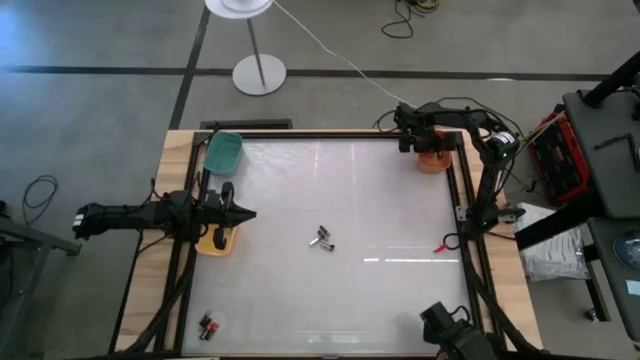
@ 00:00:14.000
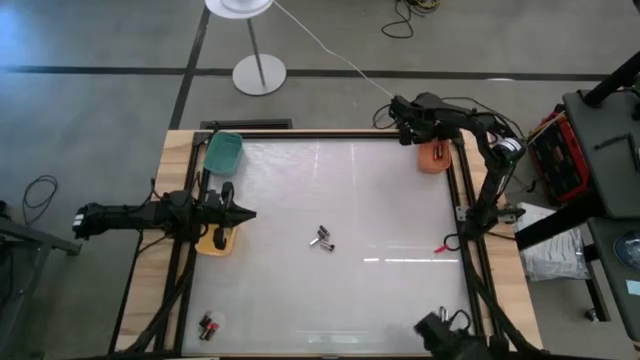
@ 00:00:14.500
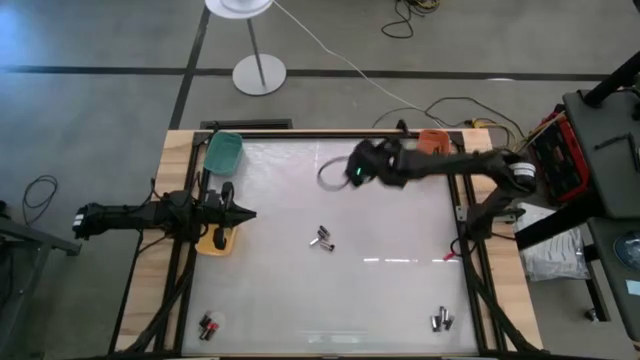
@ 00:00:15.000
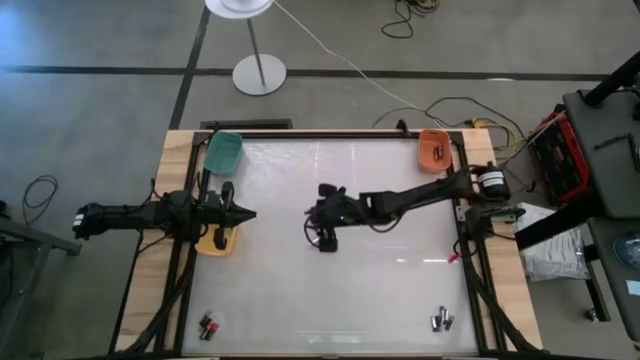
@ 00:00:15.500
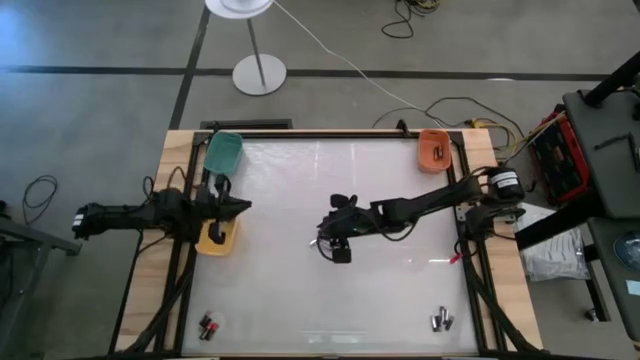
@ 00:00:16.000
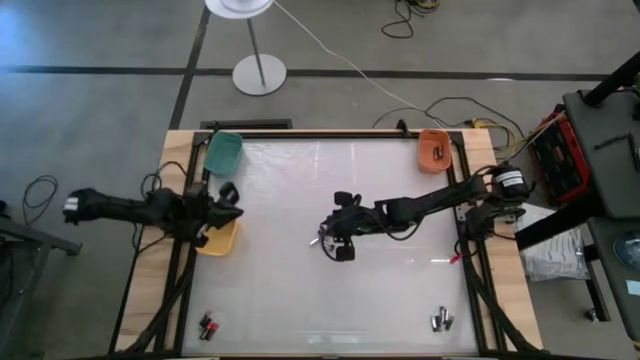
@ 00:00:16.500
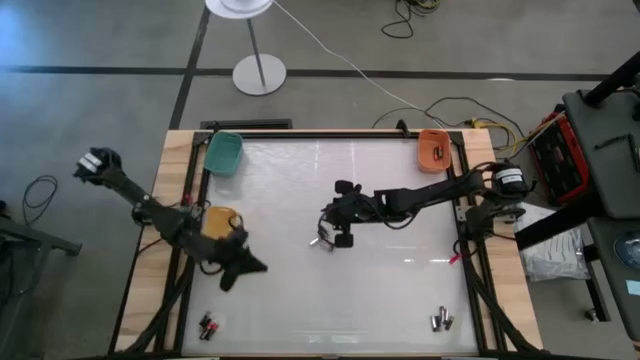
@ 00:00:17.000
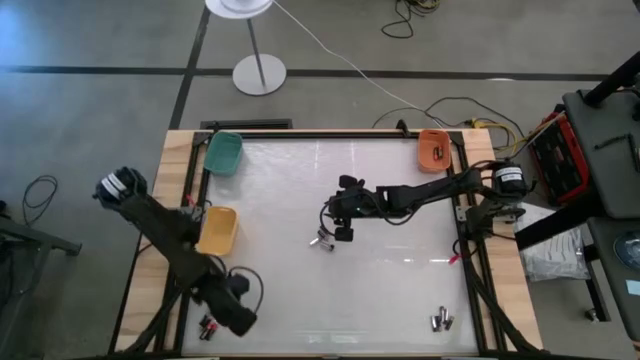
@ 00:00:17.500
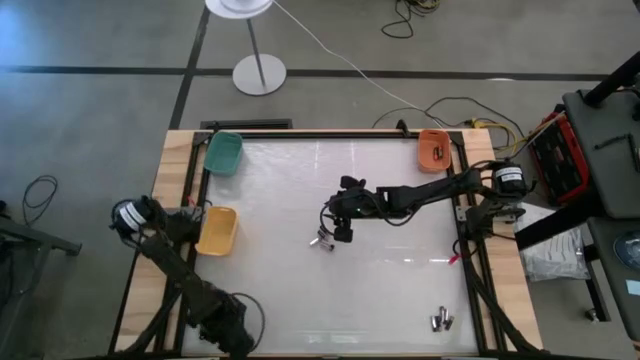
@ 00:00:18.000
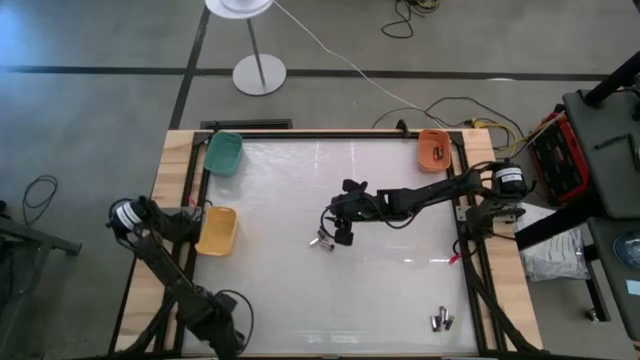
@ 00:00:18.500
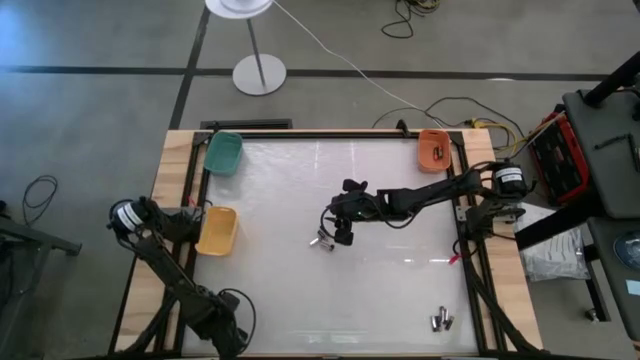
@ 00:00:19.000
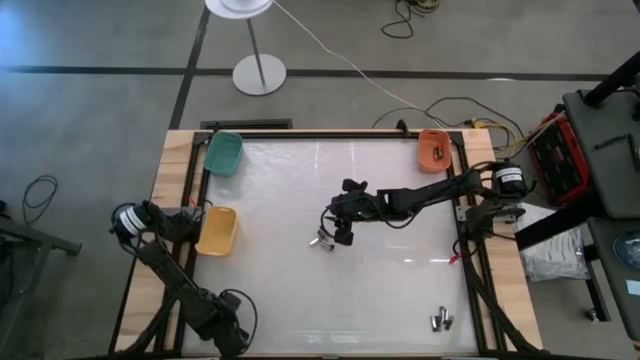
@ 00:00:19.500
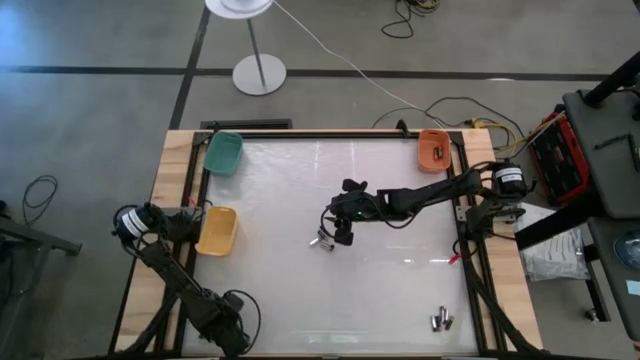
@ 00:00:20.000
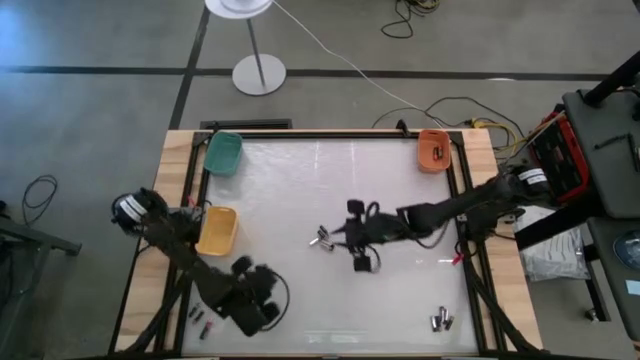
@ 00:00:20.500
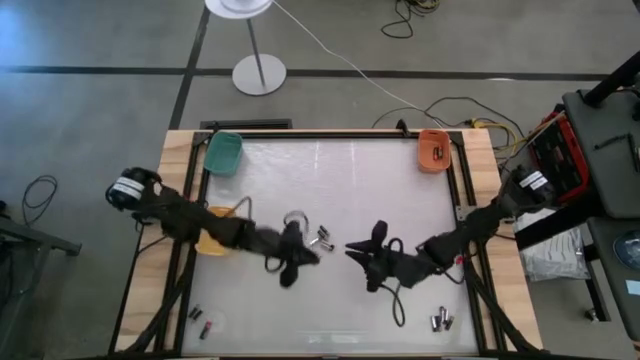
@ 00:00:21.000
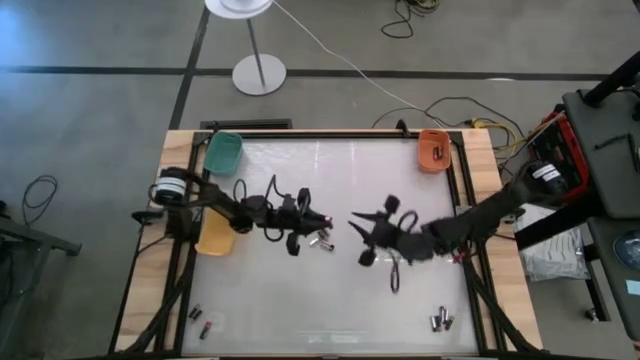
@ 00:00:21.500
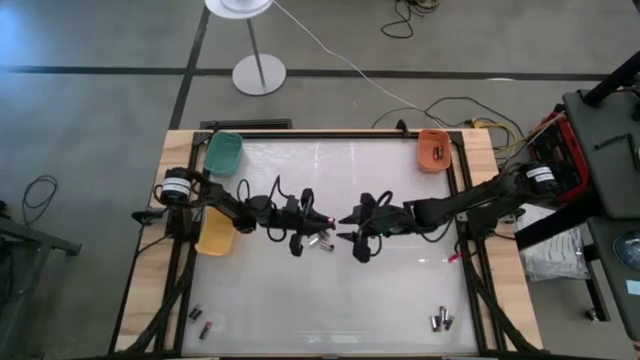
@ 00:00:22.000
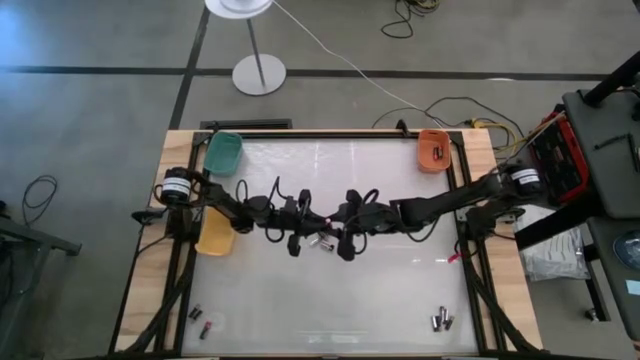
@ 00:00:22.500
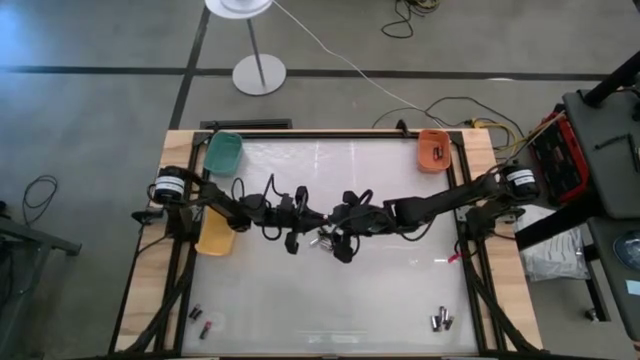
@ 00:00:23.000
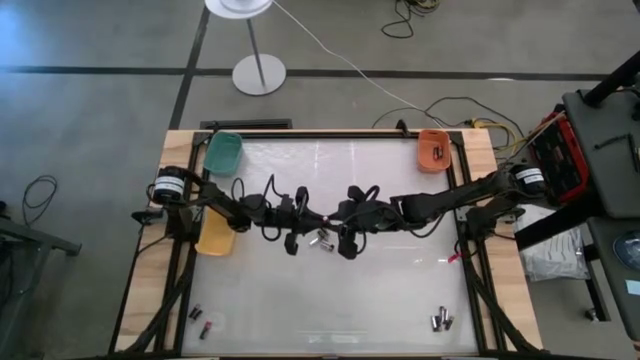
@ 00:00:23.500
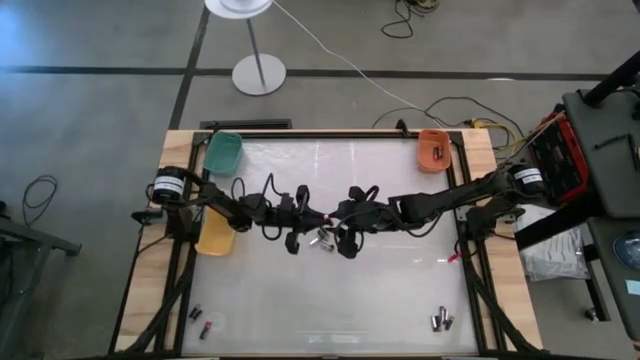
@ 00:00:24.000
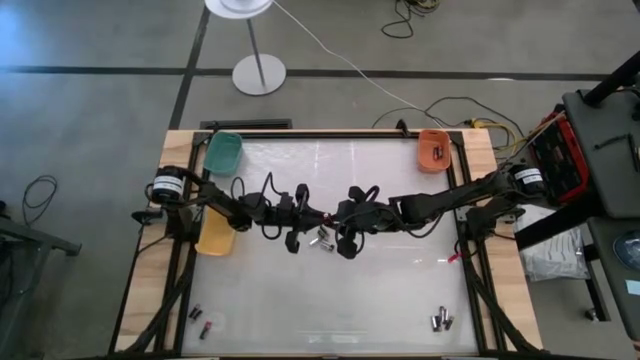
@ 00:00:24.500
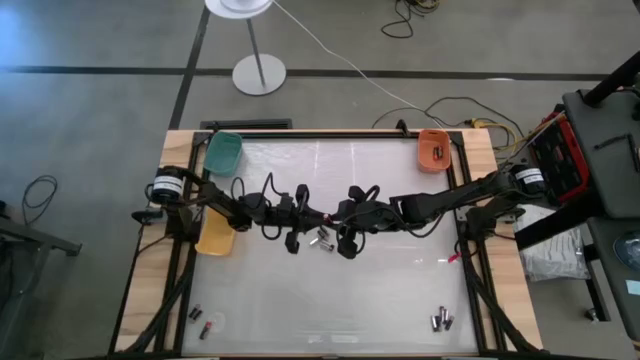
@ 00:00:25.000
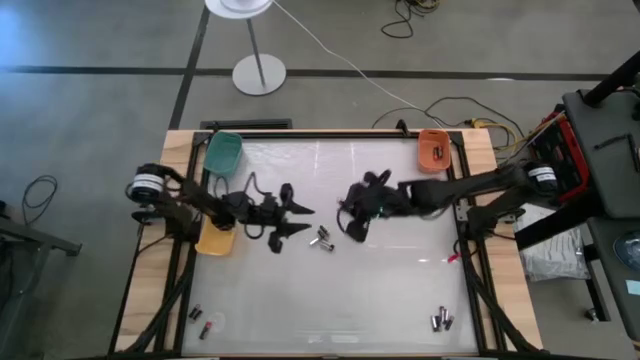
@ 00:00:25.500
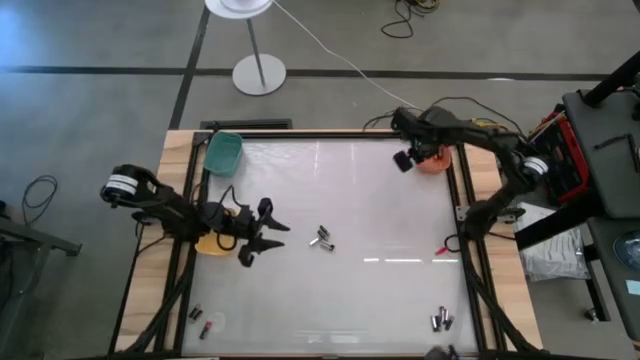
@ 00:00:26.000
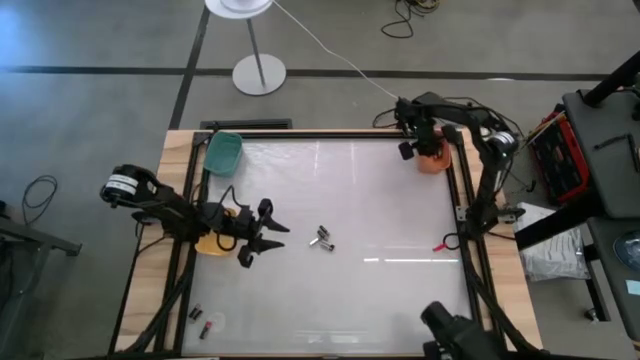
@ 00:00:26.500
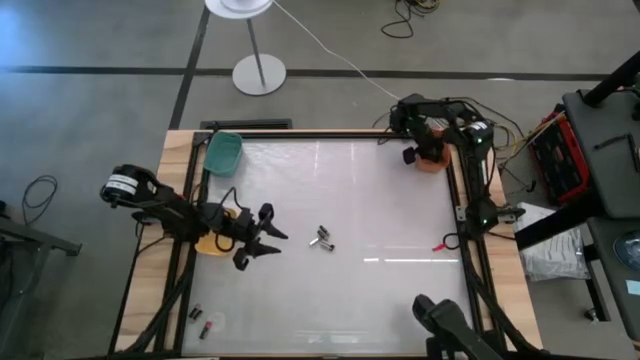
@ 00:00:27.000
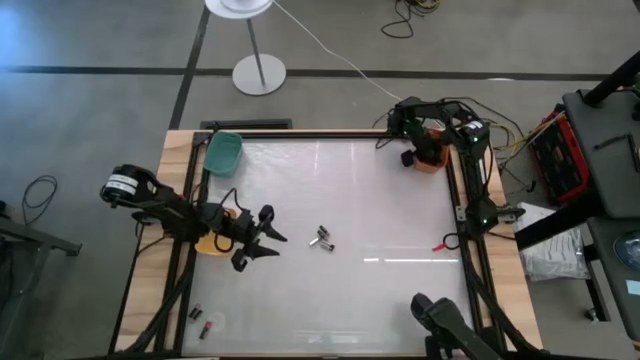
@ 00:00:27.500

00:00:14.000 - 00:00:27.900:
Task: Sort batteries
Put the red battery into the orange bin

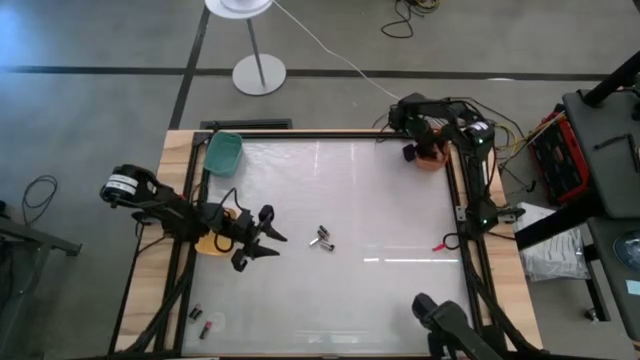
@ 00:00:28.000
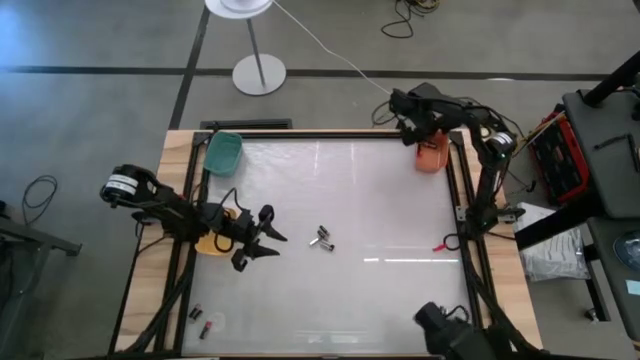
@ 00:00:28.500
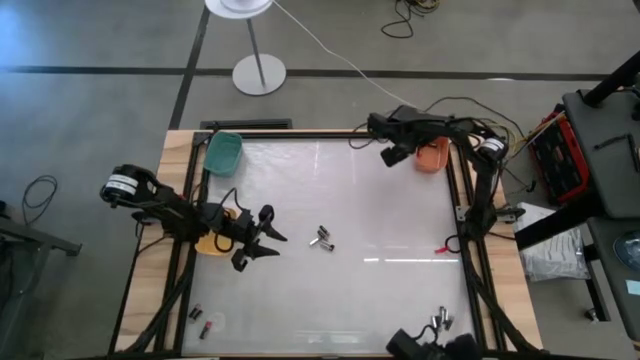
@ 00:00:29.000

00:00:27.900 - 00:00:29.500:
Adjust the orange bin

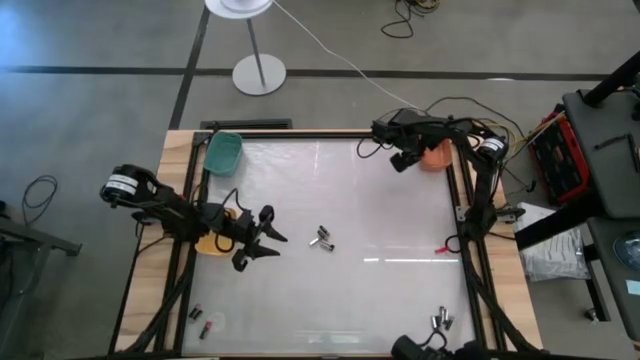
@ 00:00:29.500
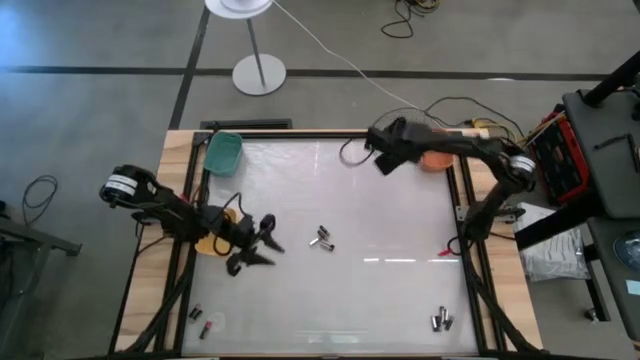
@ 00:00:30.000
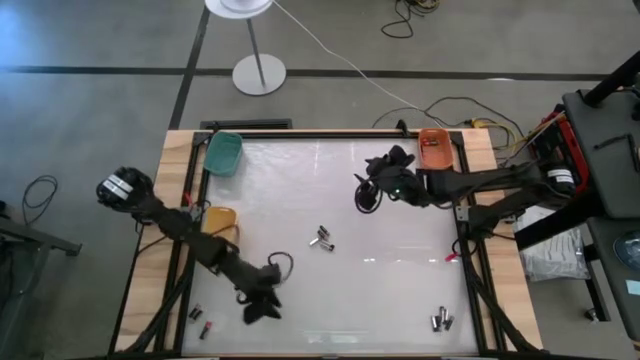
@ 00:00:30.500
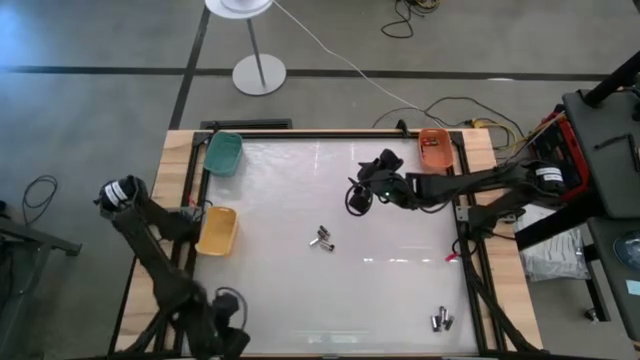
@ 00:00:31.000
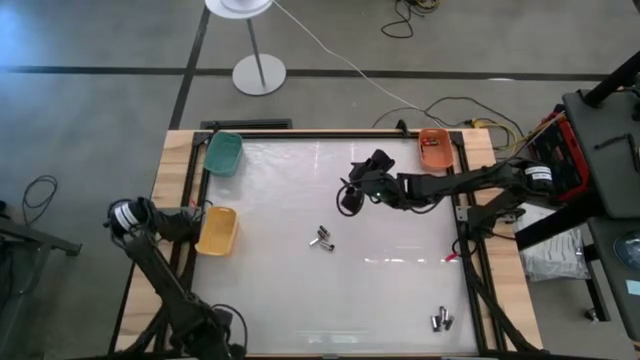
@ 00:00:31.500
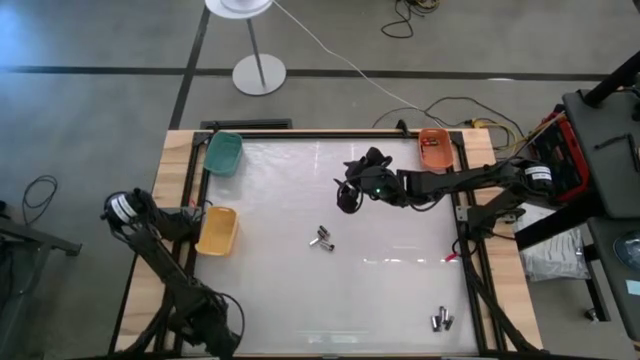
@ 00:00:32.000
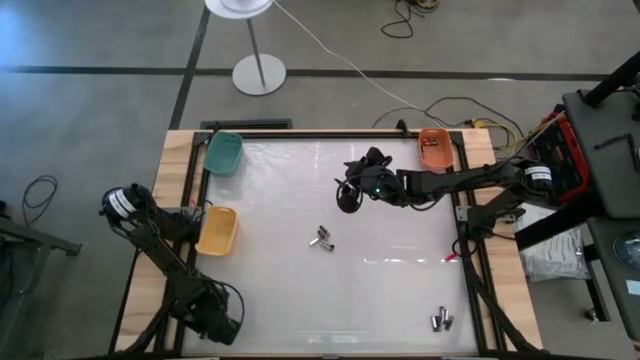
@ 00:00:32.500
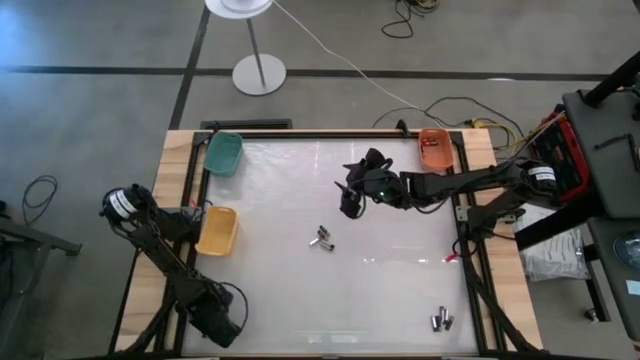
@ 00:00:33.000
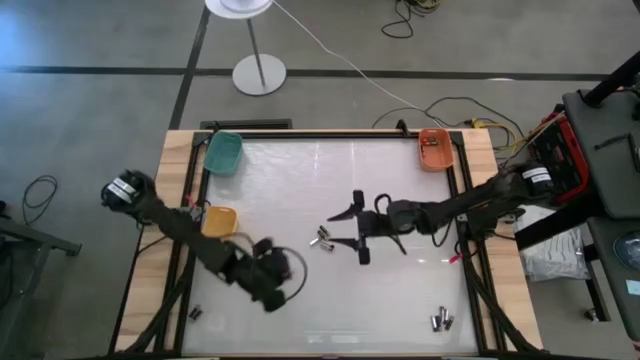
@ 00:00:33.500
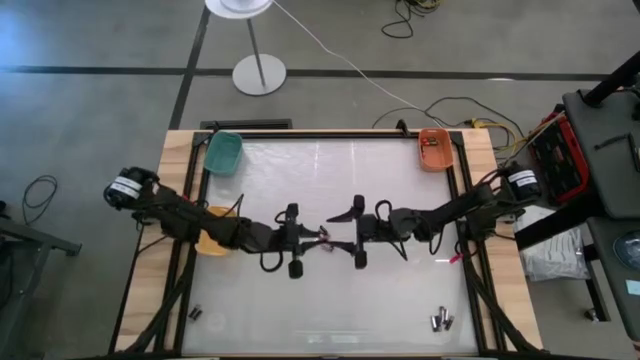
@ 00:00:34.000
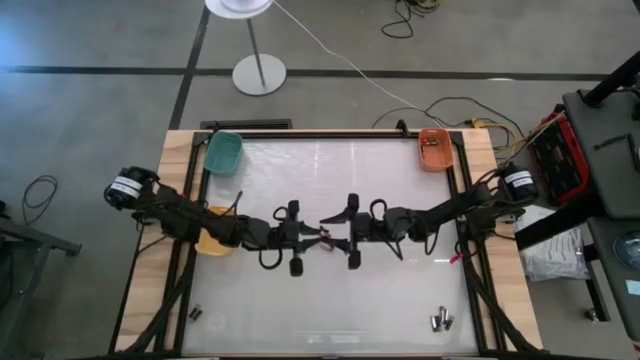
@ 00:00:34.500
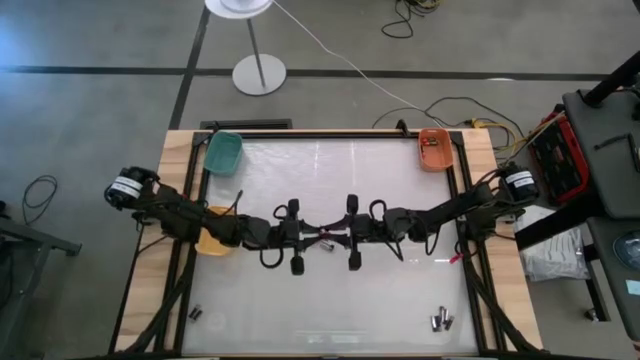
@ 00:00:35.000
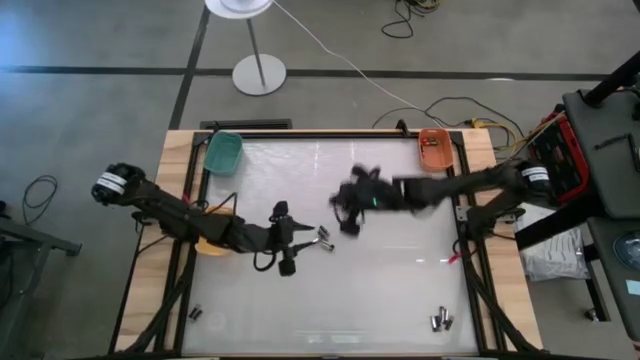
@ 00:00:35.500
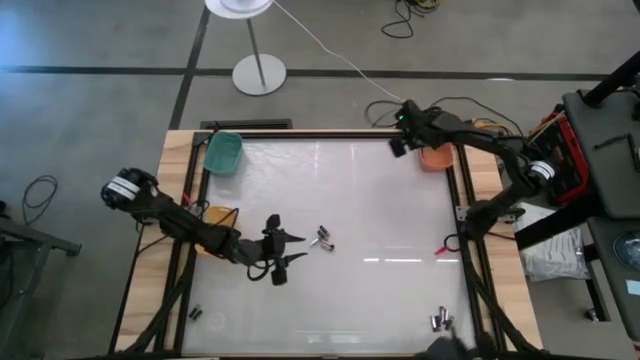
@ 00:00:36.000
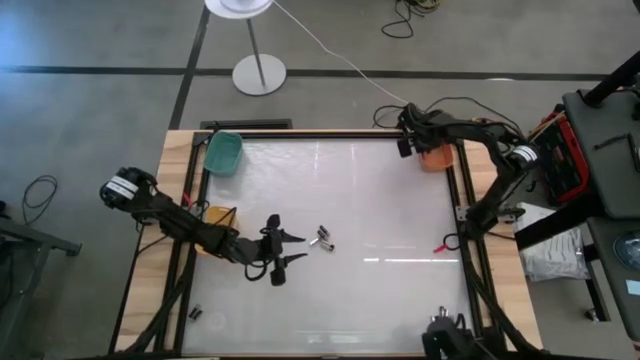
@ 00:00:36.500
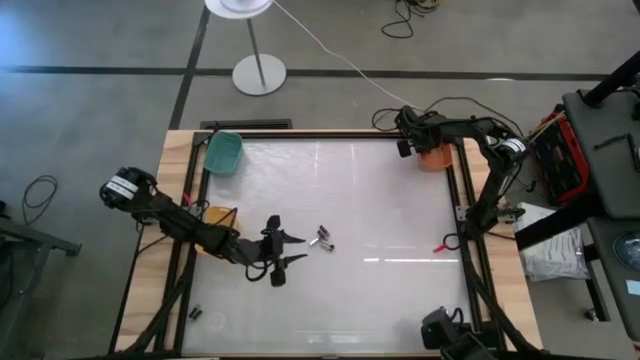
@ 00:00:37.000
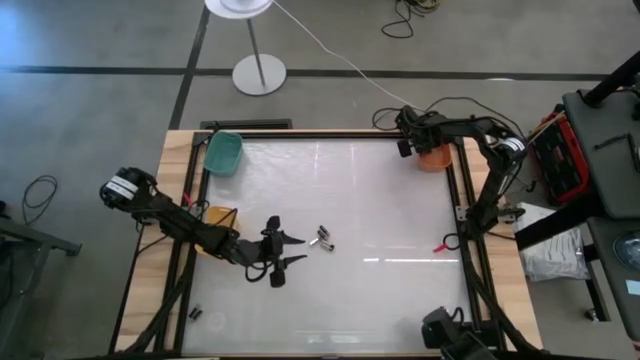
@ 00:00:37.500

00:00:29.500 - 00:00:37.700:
Put the red battery into the orange bin
